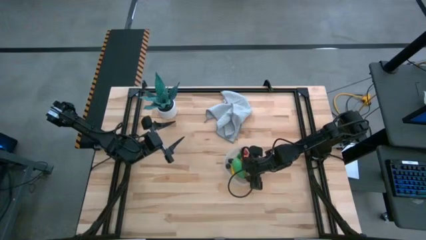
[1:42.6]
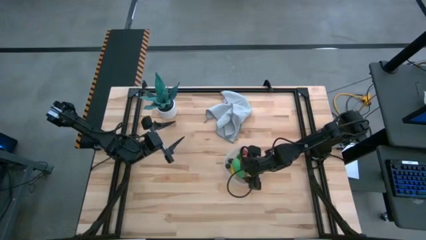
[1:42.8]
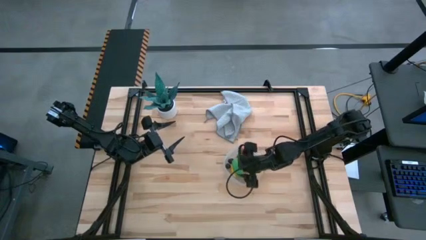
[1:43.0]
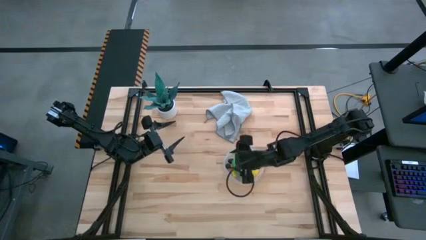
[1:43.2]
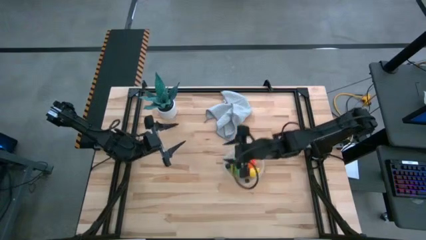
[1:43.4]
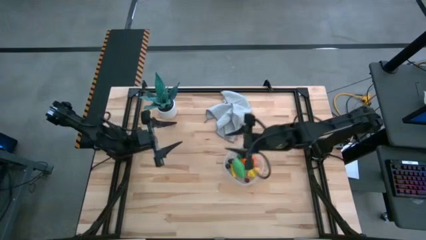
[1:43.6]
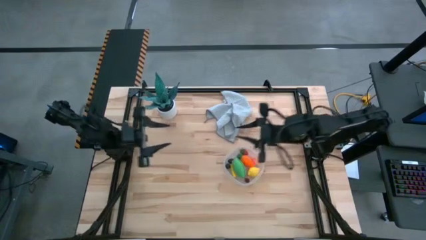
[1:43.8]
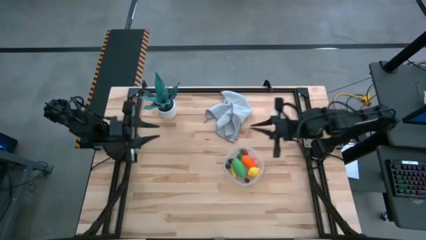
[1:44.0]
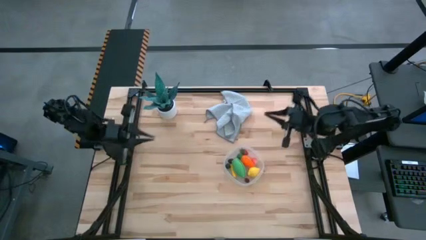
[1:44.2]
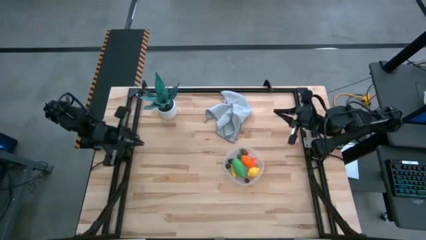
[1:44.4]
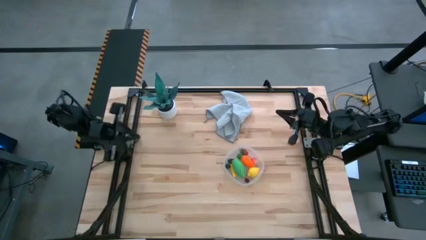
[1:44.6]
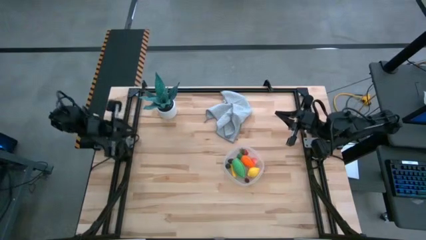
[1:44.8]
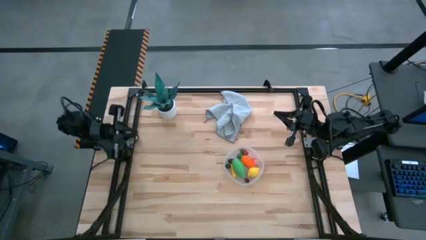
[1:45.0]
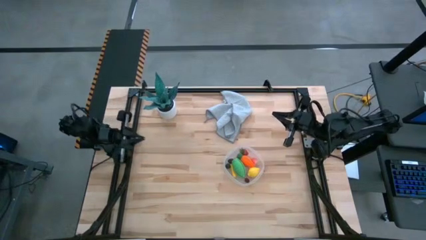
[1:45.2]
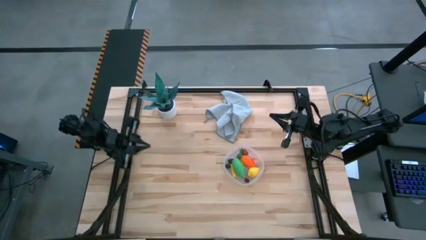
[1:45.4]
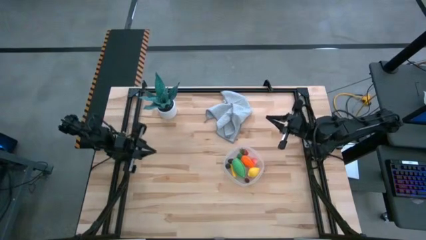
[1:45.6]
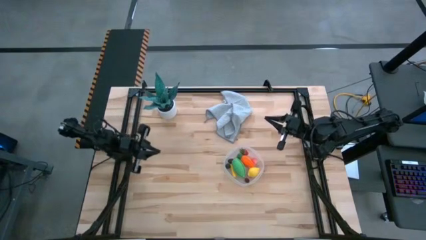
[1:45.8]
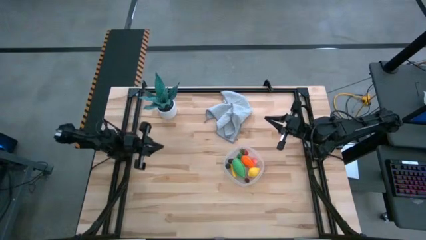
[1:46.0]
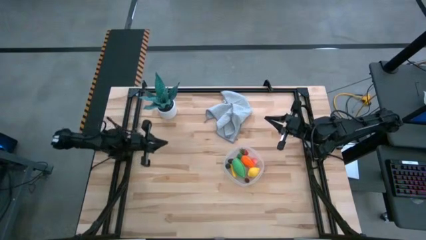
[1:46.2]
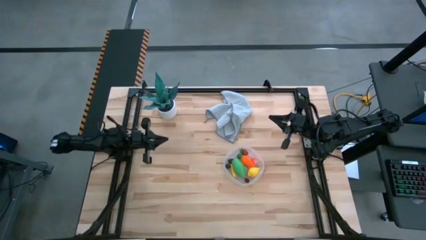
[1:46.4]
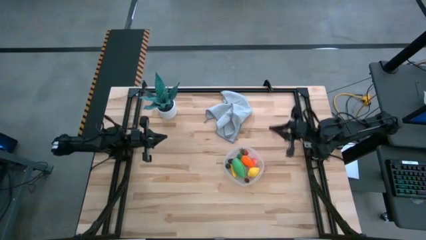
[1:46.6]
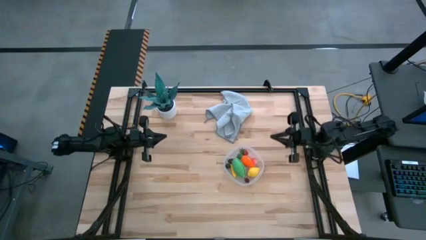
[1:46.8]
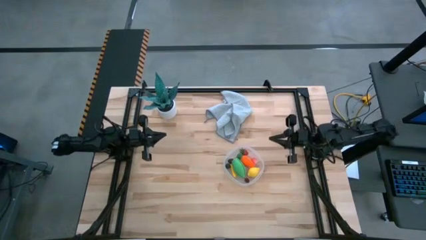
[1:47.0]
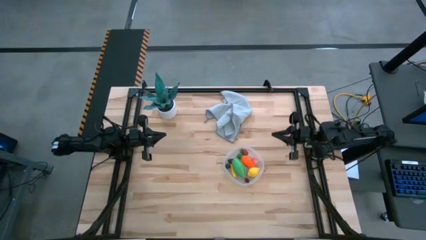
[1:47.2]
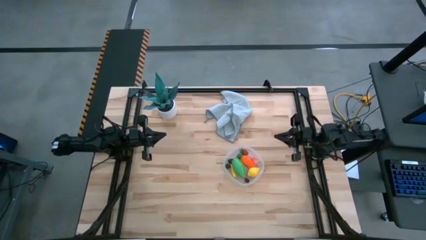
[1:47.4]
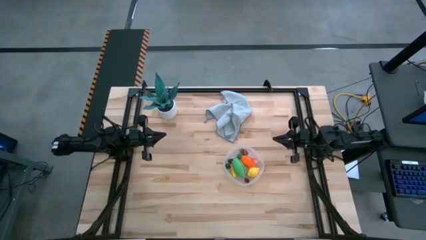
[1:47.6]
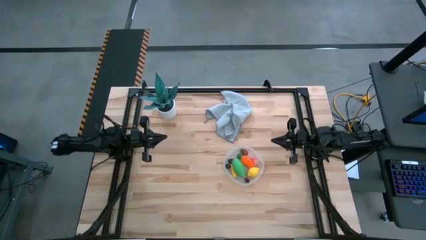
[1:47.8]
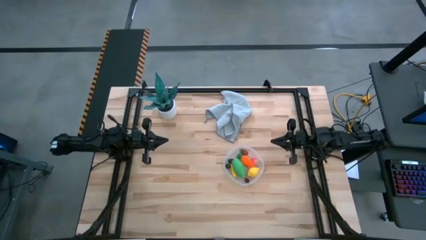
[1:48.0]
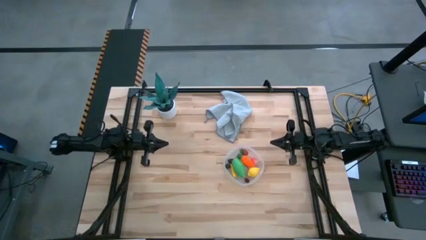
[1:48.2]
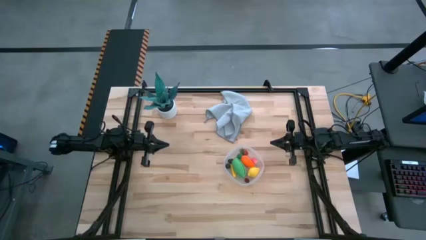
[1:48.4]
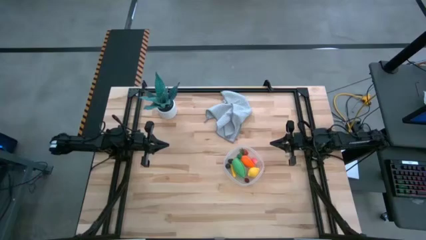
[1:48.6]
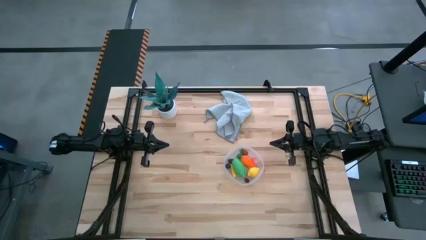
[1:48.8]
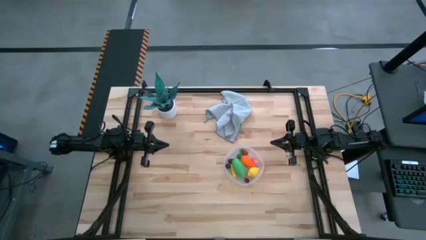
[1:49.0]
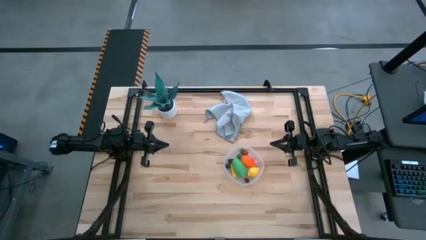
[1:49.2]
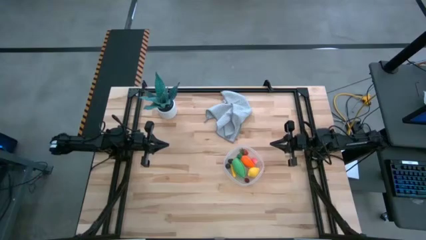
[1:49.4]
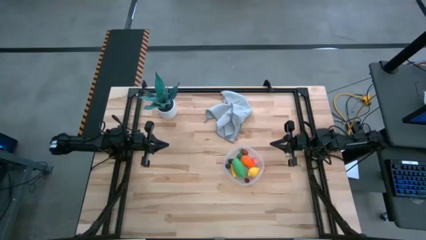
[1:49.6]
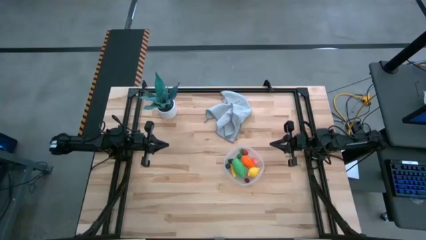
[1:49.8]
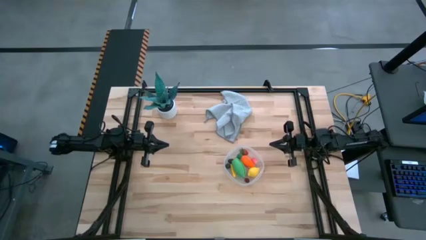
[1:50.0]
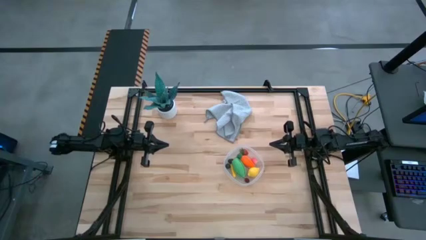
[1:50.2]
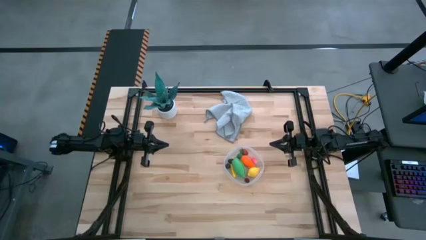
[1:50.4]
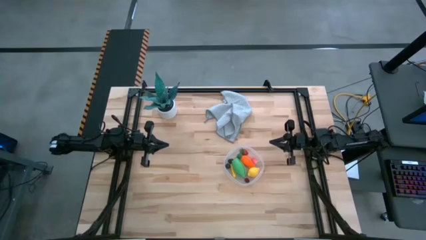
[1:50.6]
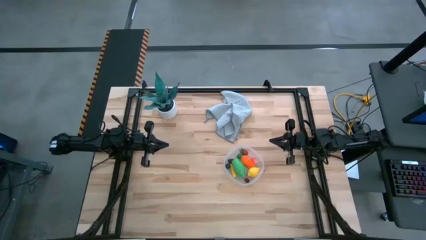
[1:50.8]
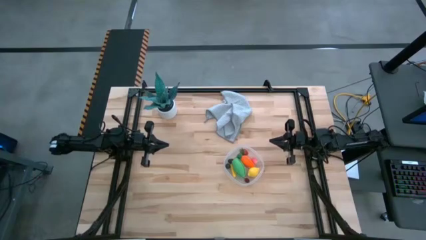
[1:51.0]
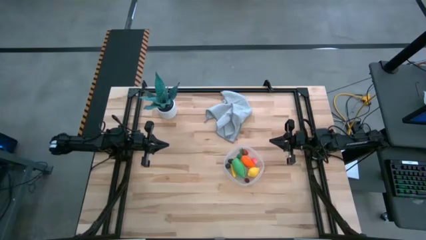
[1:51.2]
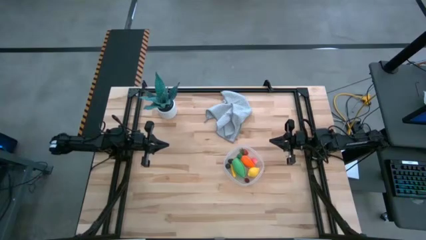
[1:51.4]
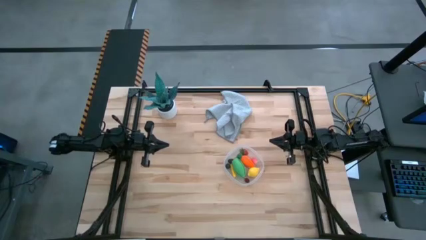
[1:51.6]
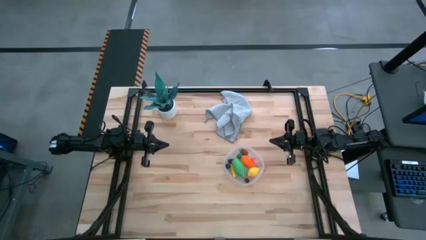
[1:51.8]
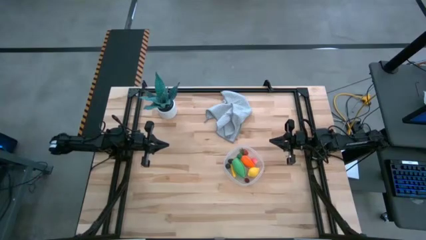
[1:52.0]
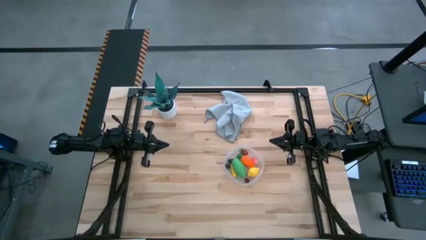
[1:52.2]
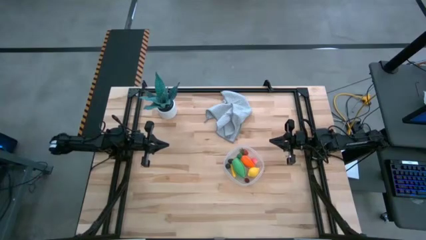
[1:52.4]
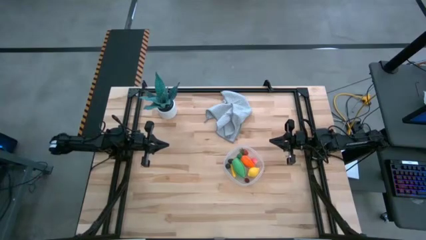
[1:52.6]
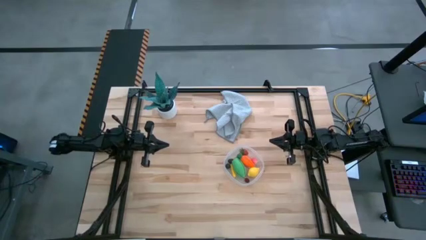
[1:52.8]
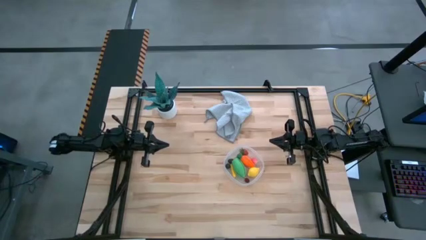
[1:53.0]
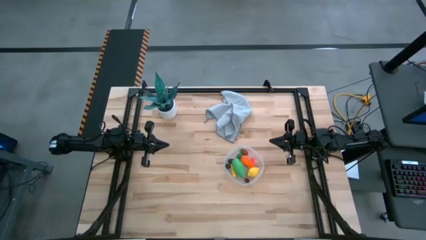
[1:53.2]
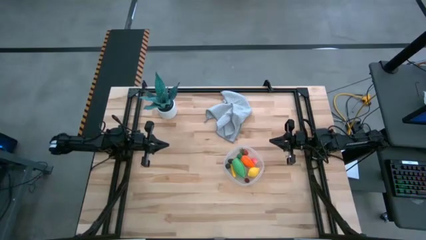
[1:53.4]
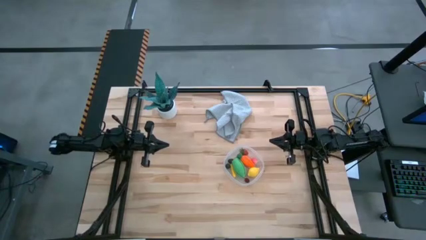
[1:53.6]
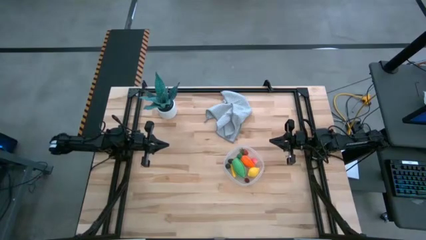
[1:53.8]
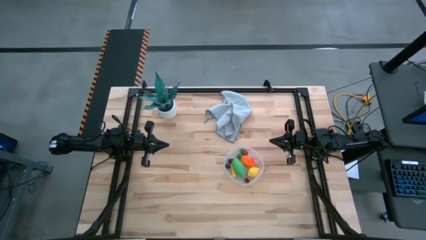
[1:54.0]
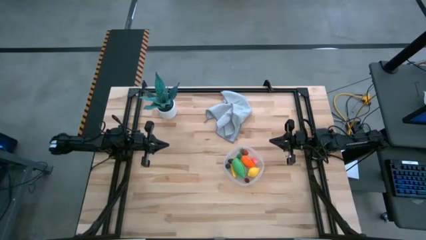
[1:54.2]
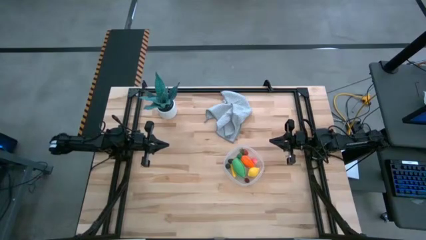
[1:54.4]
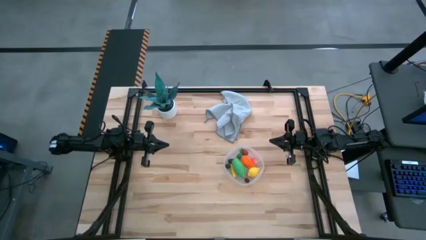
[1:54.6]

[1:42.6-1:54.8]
Task: Pick and placing Produce into tupperware
Return to home position

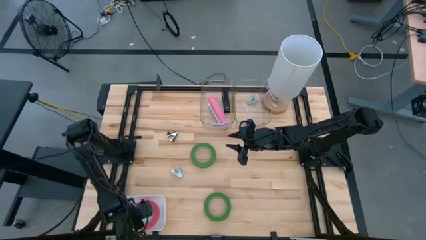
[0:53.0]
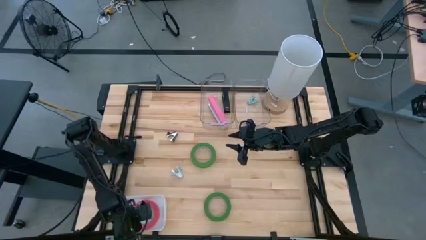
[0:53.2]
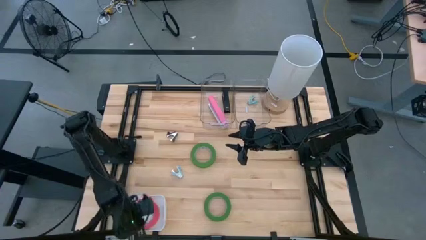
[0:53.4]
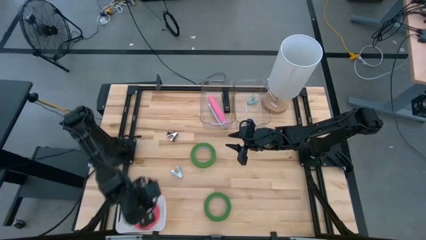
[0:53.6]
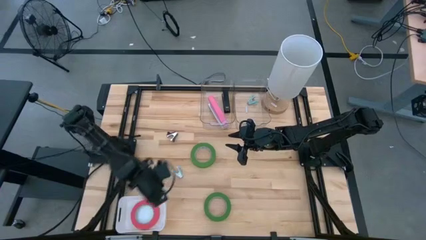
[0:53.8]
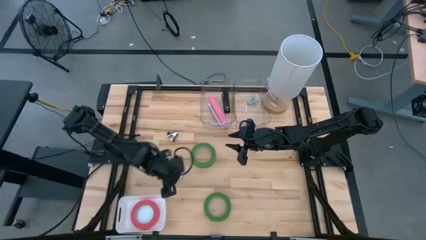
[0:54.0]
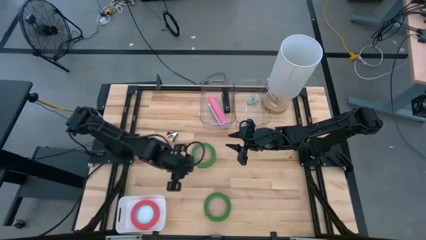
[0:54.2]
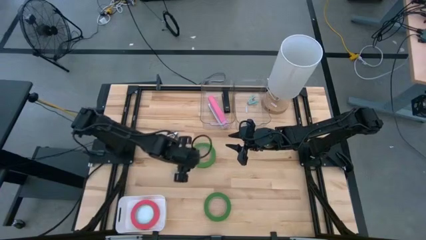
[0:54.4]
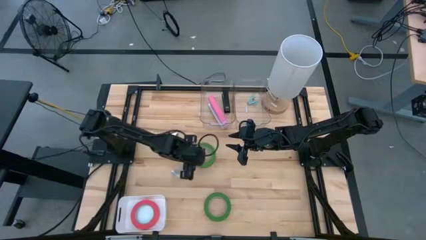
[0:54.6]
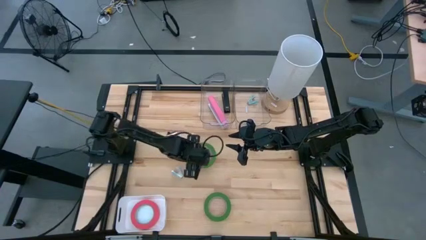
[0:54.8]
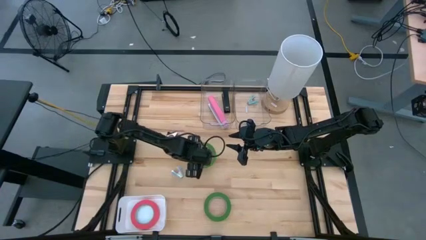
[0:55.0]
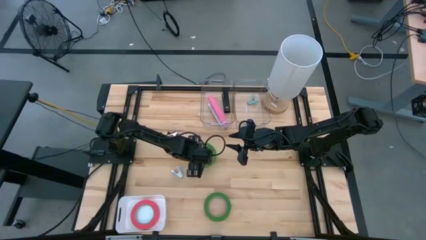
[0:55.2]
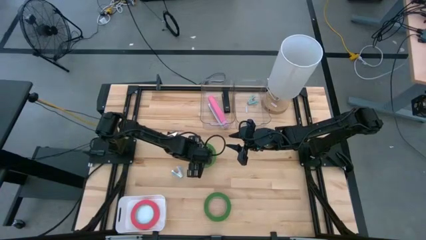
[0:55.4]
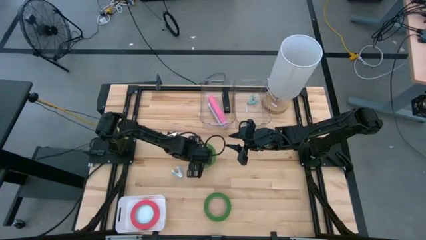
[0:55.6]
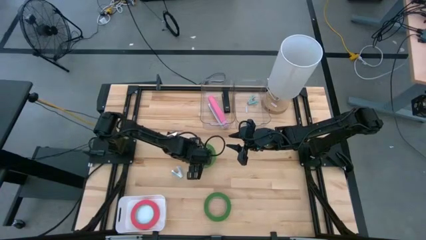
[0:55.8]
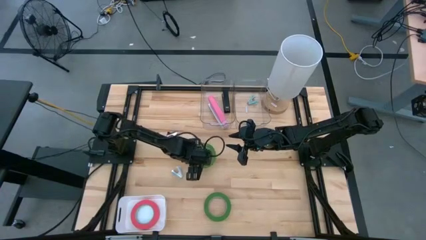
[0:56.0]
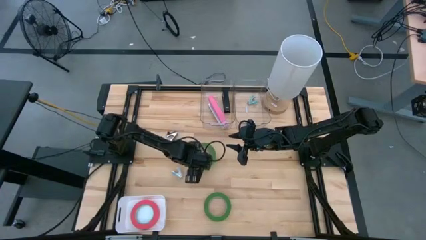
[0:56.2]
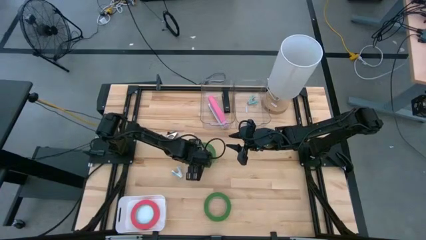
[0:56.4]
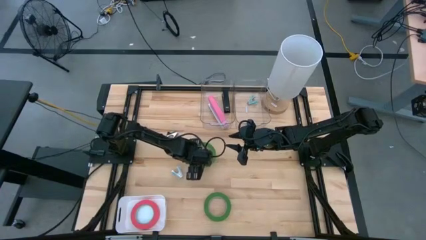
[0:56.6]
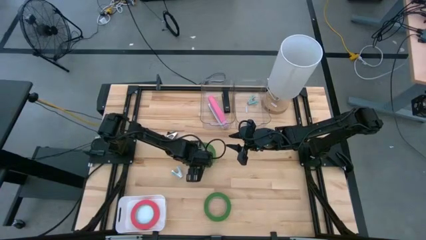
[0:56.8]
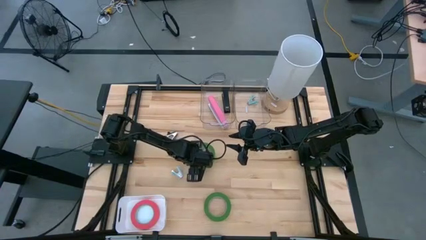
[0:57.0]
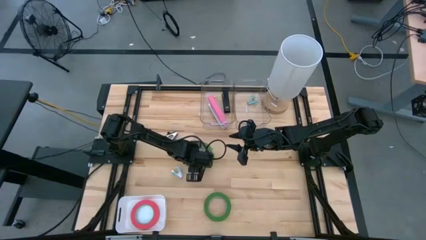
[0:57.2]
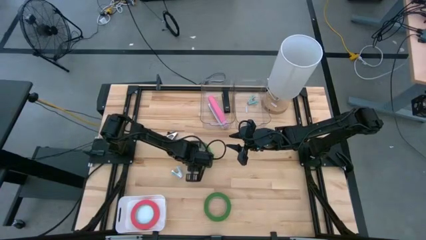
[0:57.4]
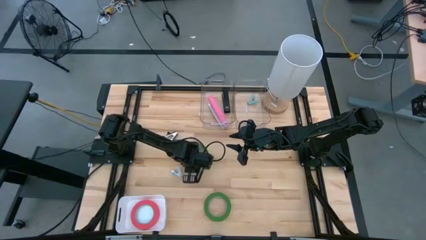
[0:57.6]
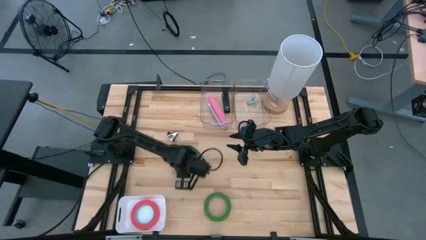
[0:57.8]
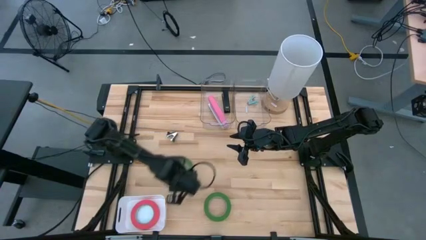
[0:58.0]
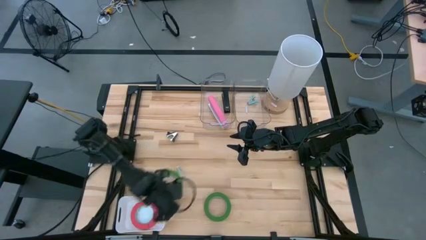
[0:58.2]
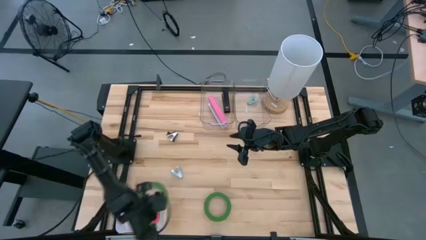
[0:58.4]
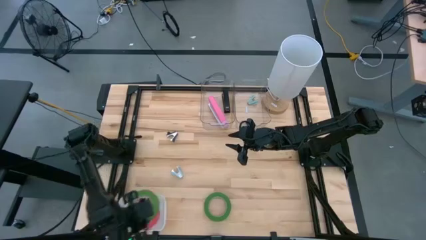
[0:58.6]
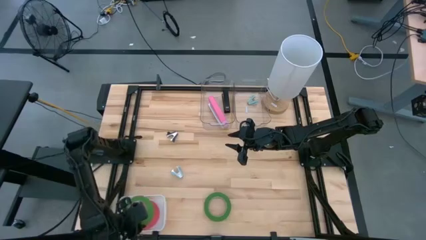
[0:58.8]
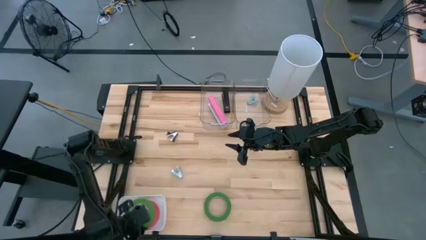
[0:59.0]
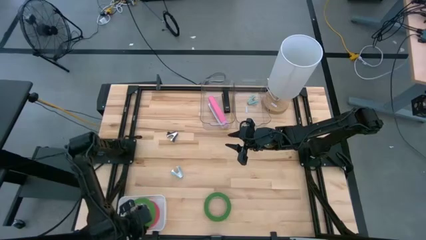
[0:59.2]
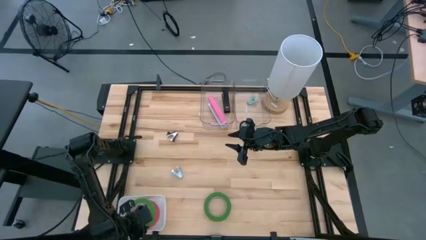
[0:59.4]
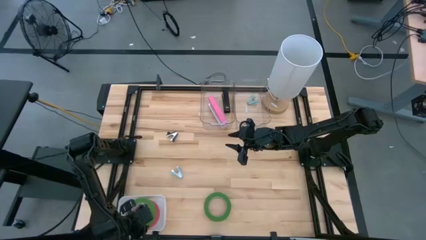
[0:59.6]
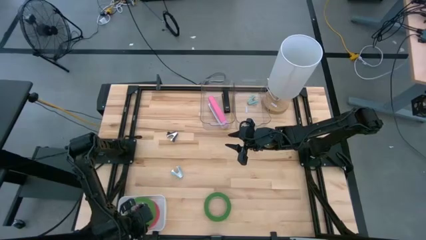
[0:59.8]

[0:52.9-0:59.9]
Task: Pick and place Stapler, Stapler remover, tape
Put the top green tape into the white bin
